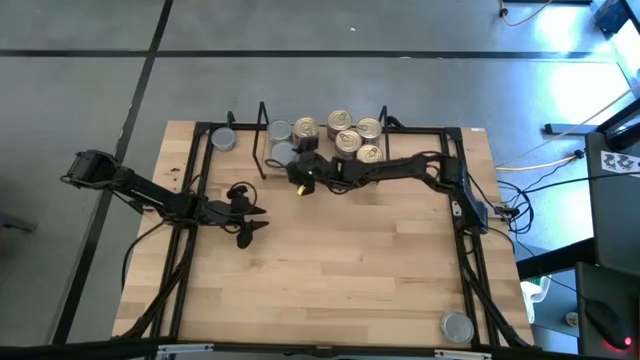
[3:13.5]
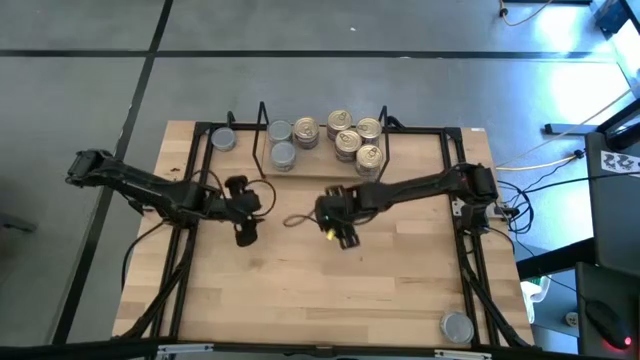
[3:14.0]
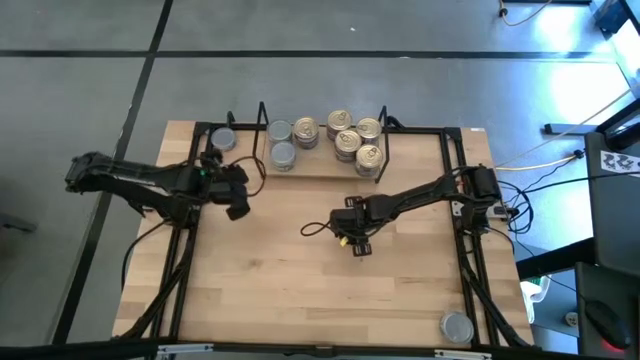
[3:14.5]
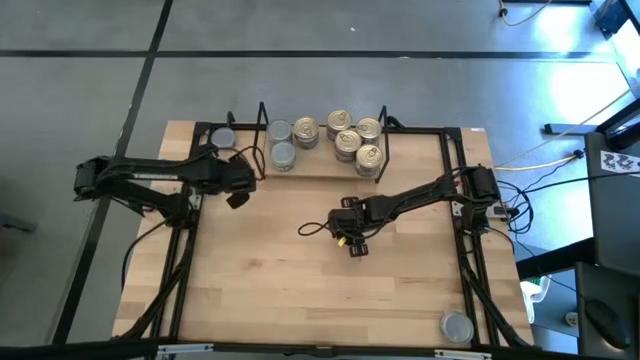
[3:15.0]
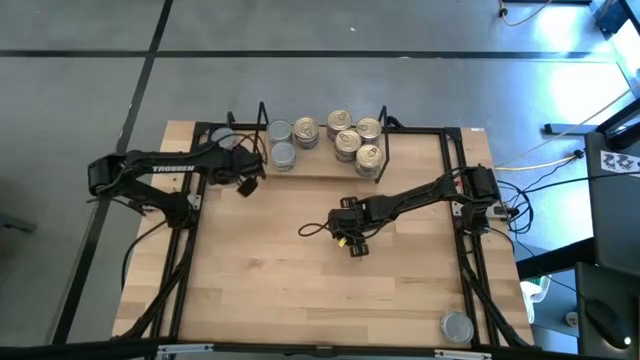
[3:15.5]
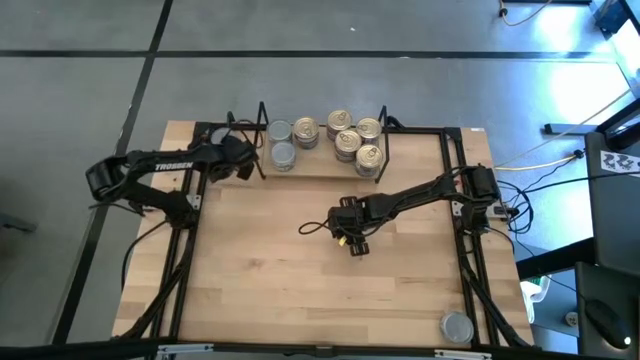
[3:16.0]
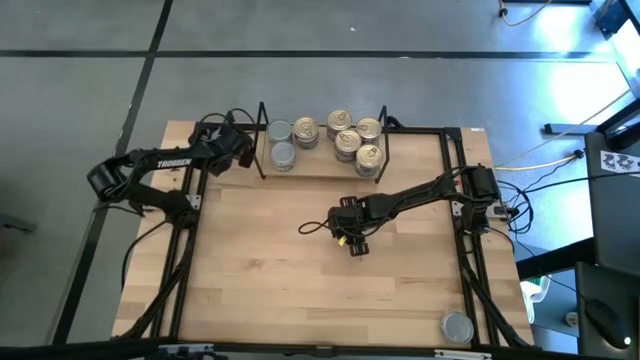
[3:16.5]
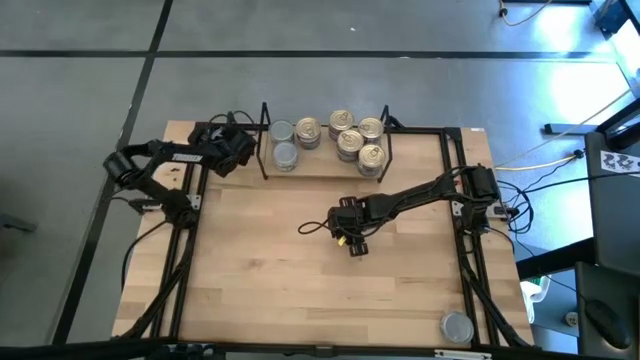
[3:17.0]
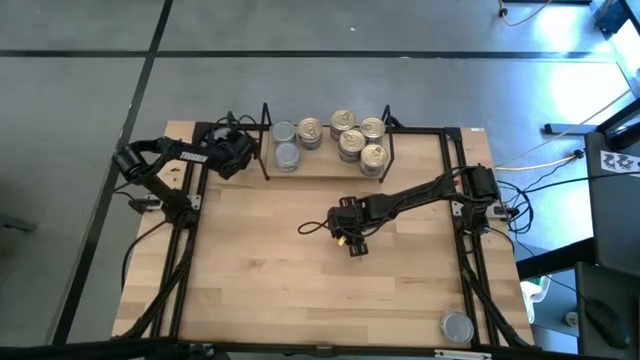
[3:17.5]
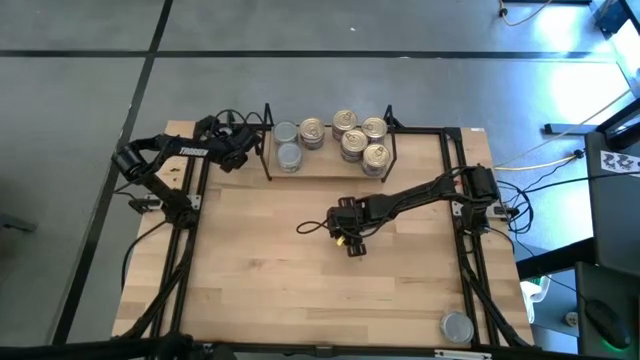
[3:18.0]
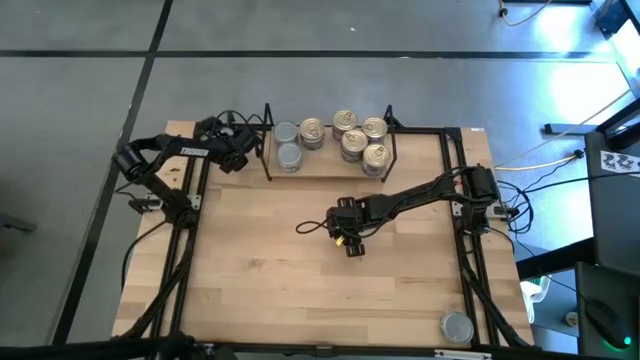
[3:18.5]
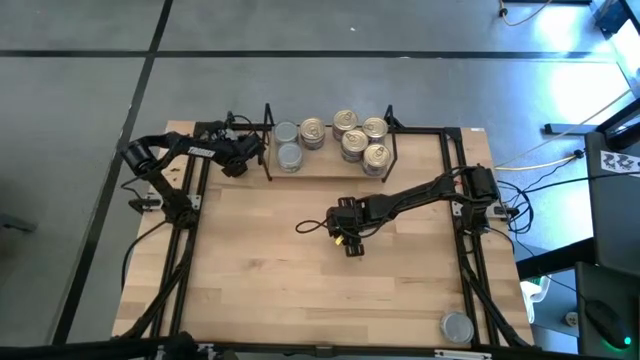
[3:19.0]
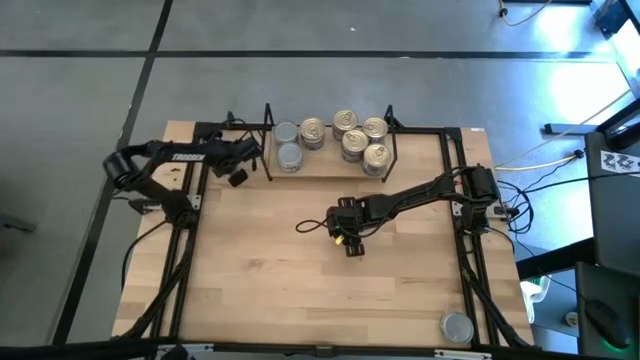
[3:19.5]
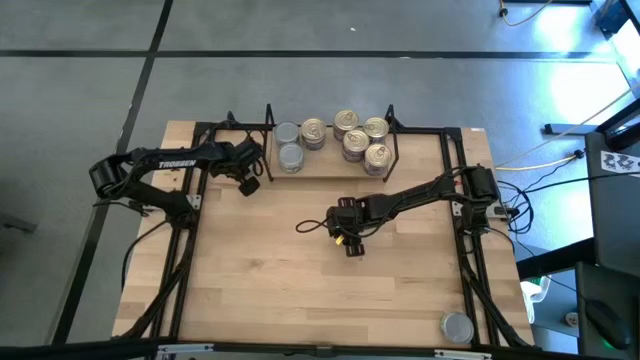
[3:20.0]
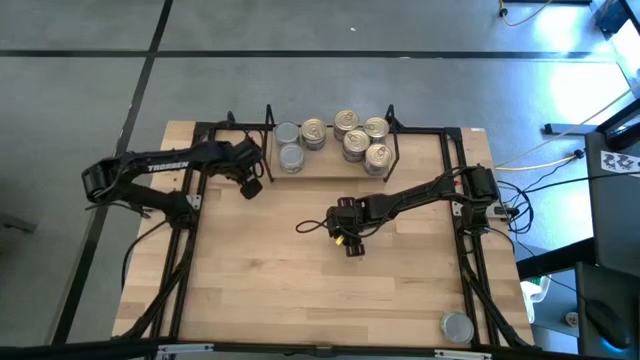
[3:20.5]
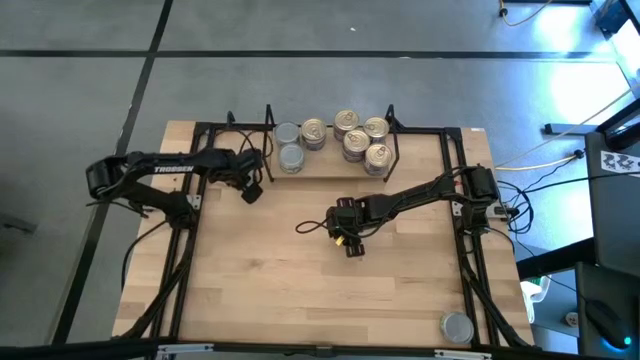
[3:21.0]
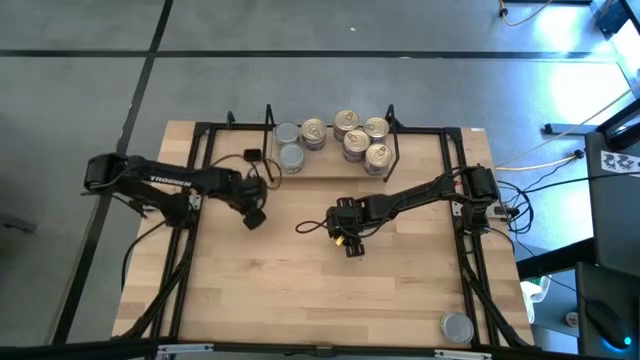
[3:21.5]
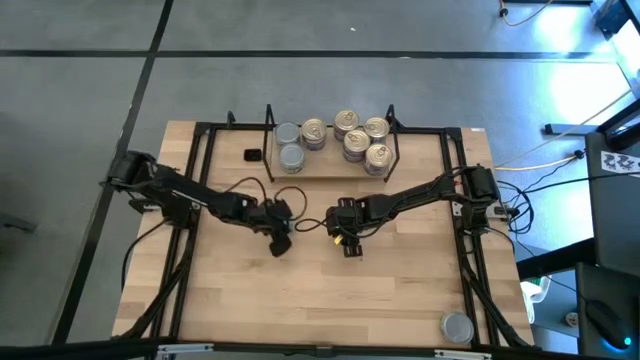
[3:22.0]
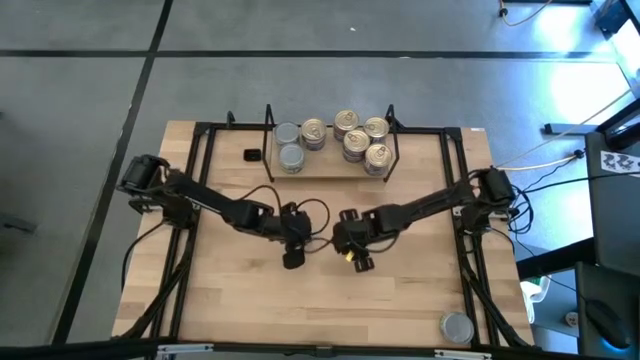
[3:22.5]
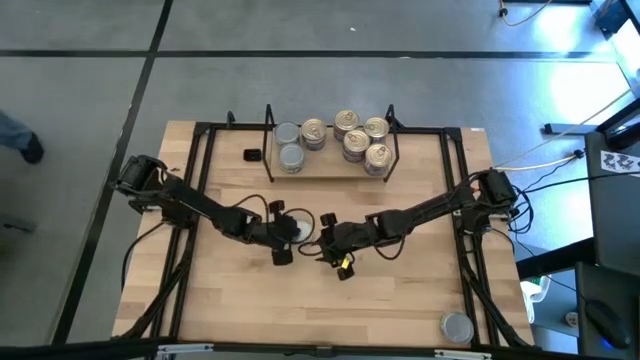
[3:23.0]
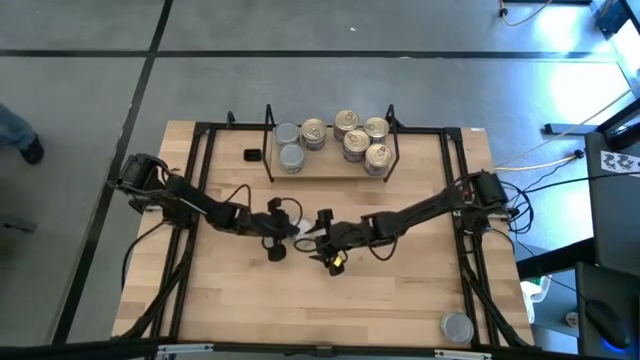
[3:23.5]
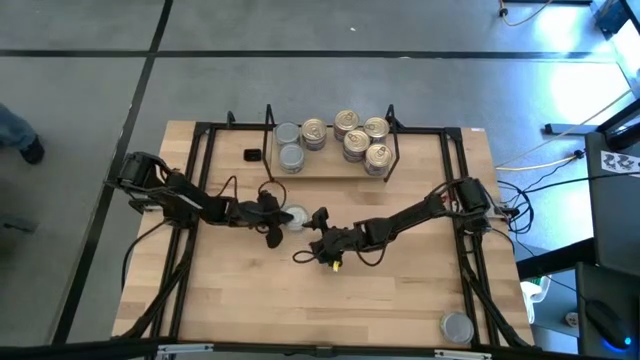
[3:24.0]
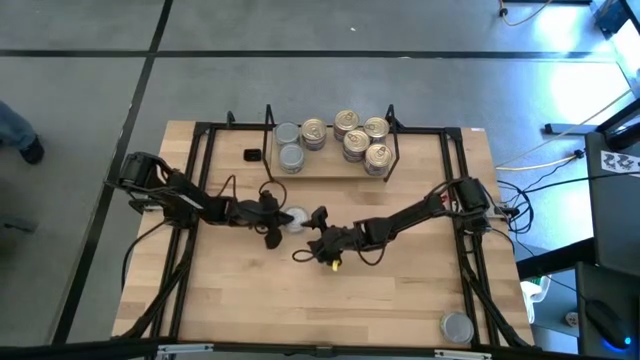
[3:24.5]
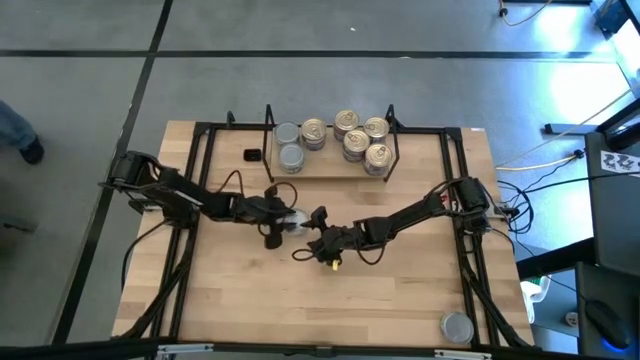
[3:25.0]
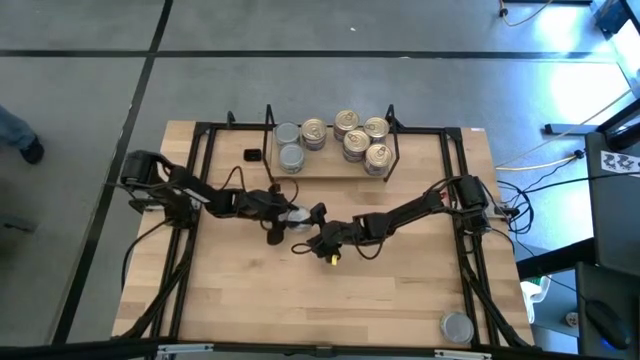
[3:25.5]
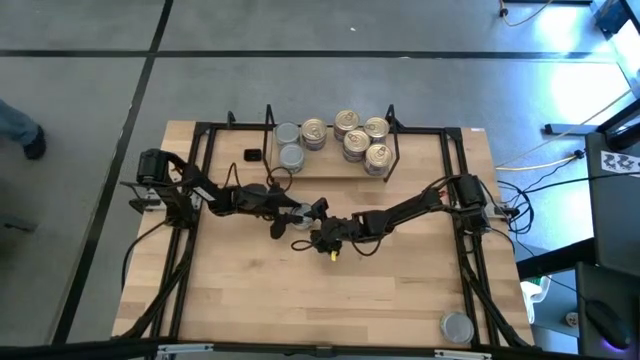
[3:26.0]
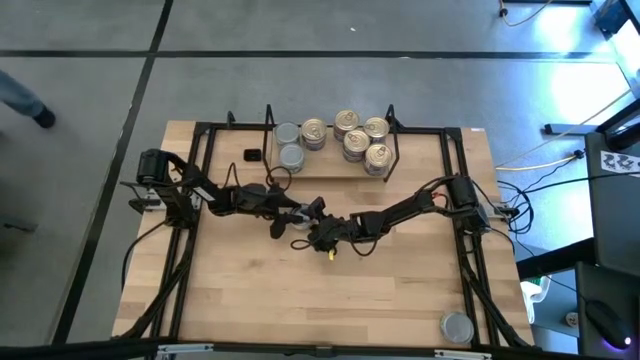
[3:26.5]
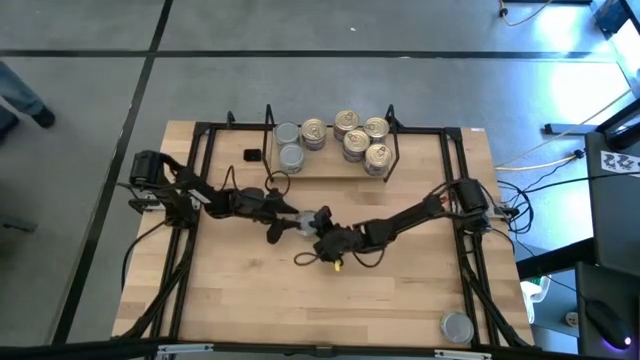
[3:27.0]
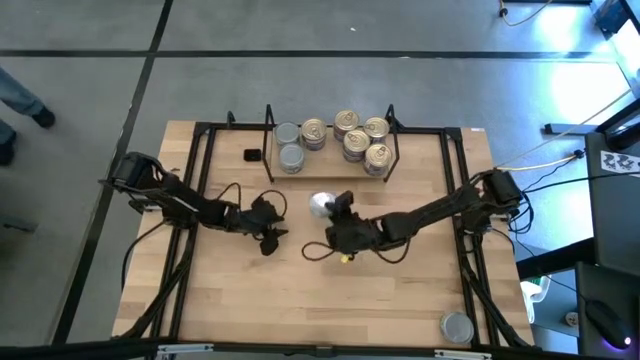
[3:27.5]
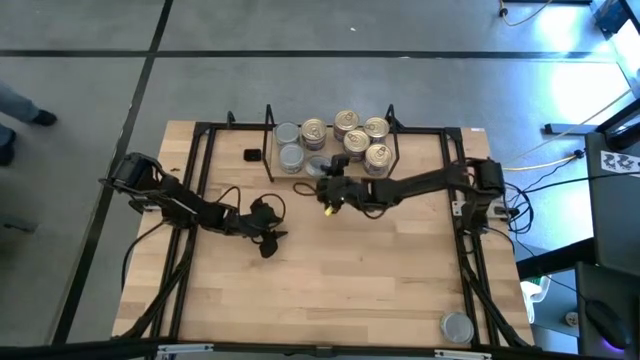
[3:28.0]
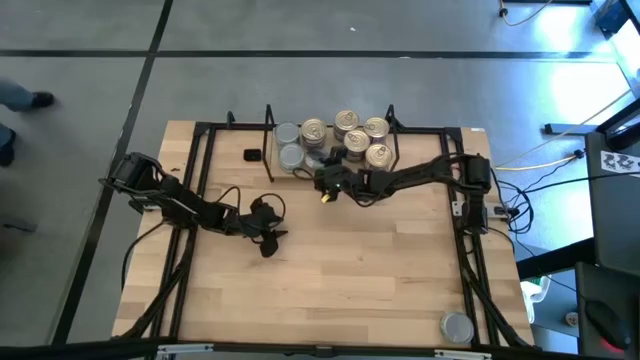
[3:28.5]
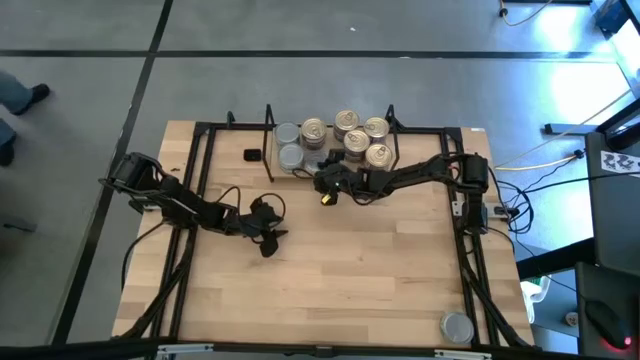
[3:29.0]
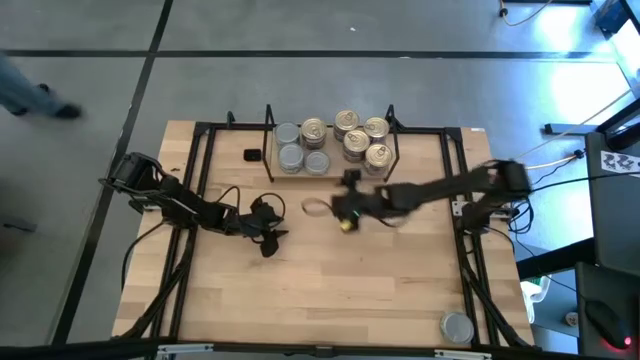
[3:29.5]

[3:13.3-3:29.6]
Task: Stack canned seafood by type on shelf
Put the green tuna can on the shelf

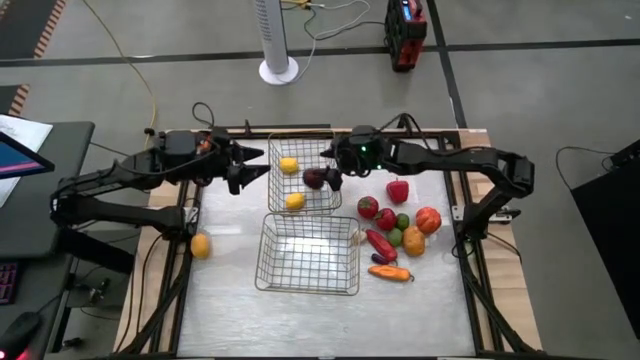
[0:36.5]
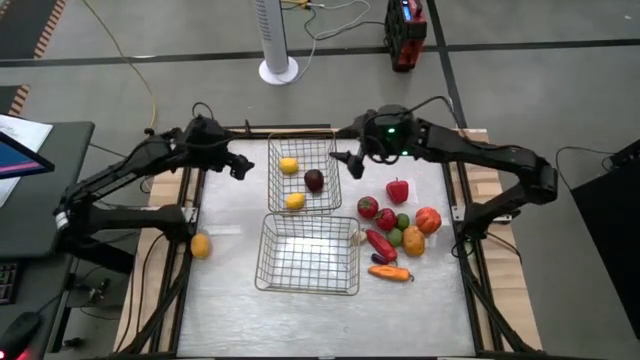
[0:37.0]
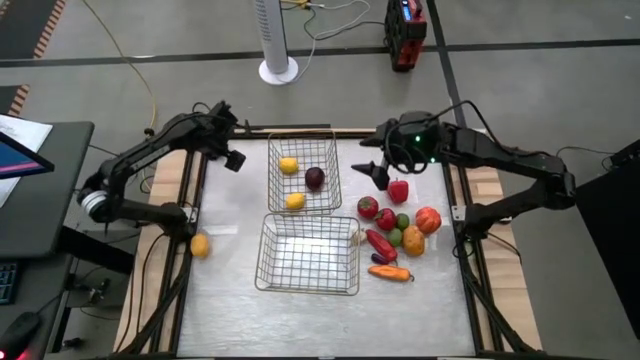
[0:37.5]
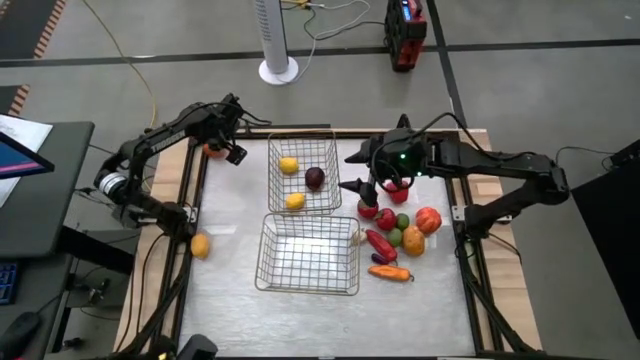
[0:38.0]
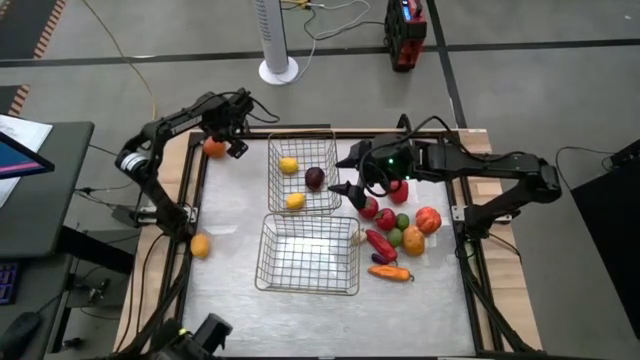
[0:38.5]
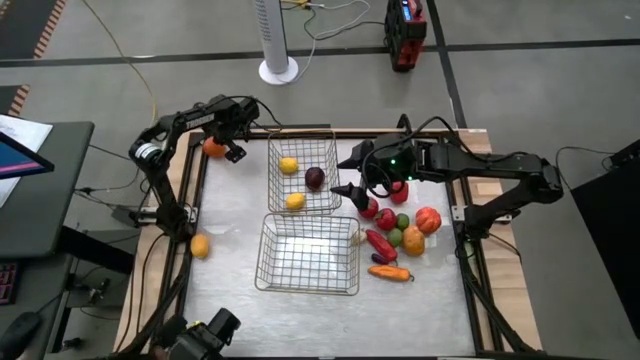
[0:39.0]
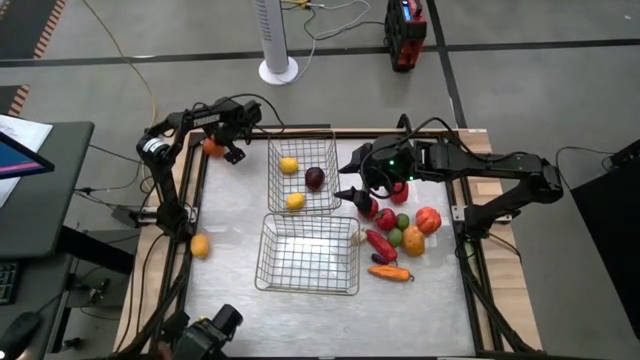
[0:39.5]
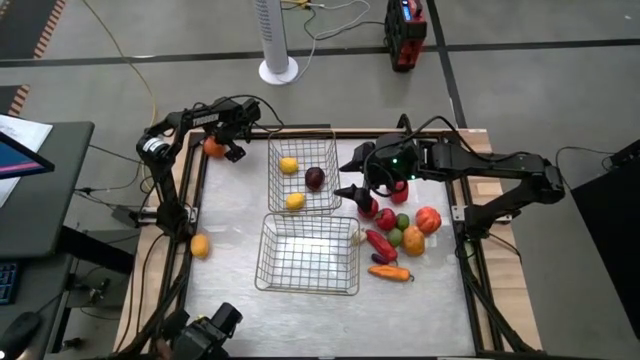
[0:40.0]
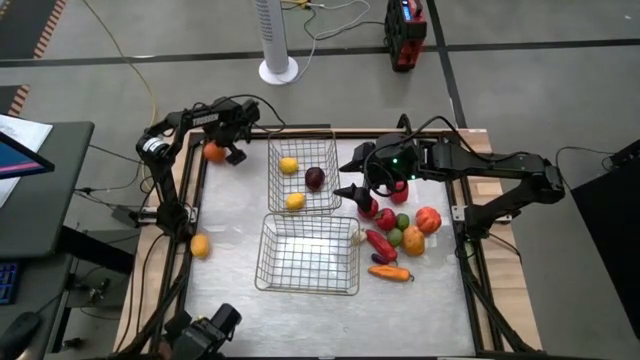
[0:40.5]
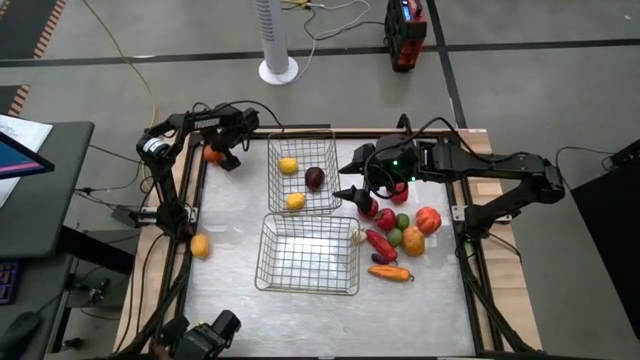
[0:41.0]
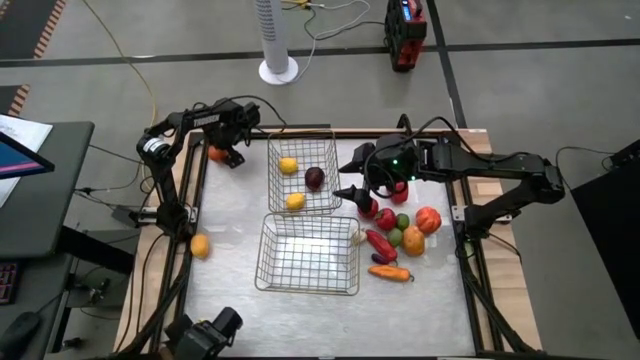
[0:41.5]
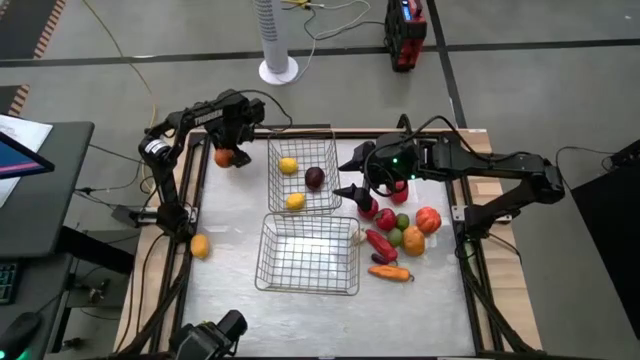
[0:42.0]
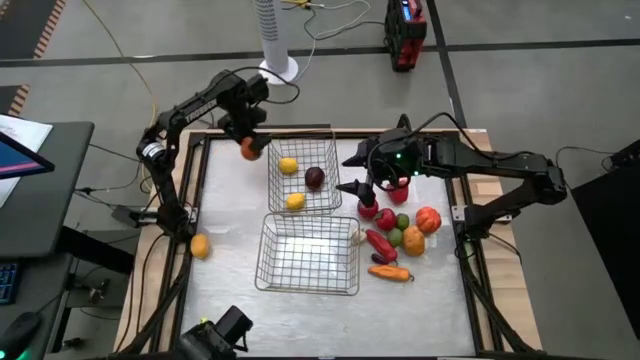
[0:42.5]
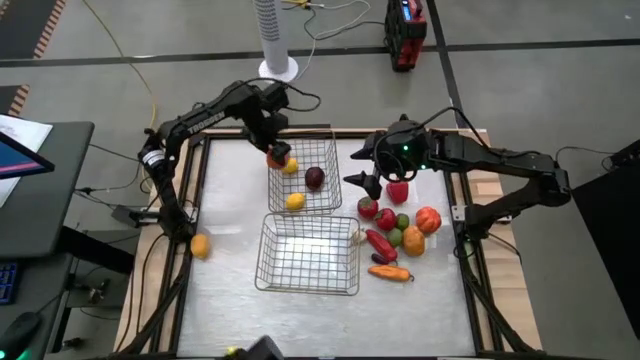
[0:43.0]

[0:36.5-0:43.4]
Task: Sort produce into baskets
Put the orange into the top wire basket
